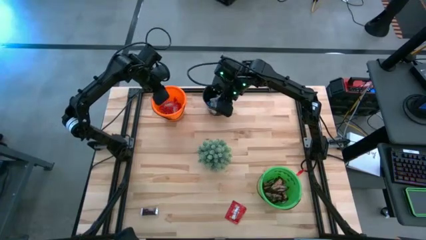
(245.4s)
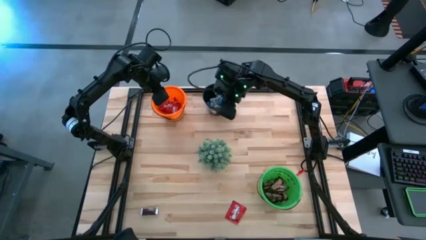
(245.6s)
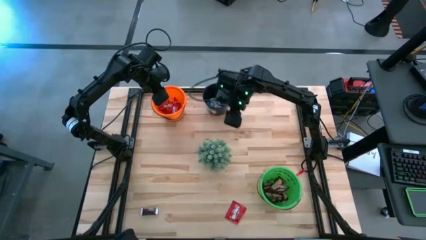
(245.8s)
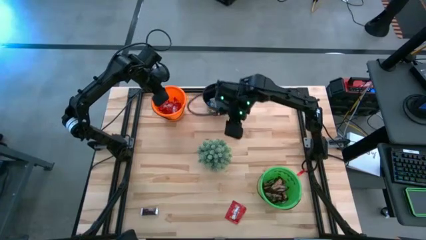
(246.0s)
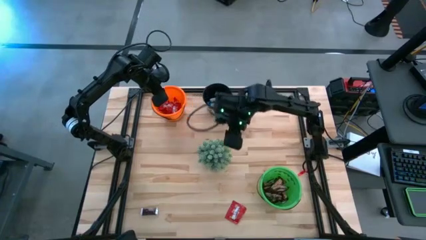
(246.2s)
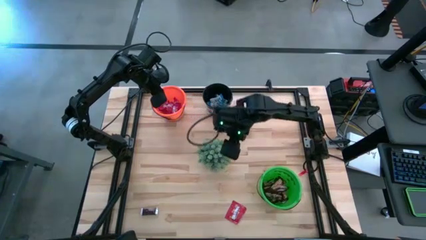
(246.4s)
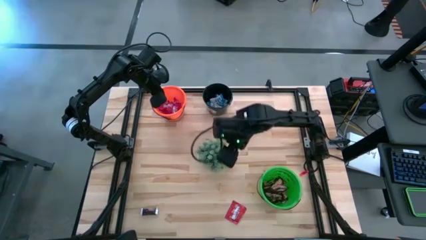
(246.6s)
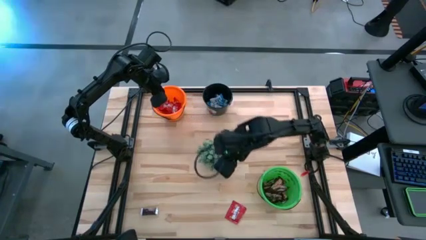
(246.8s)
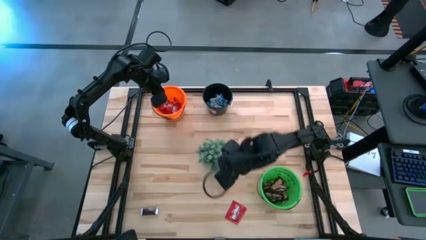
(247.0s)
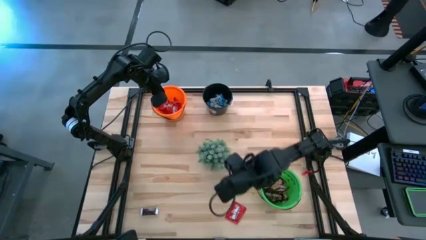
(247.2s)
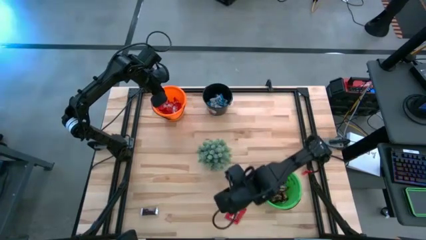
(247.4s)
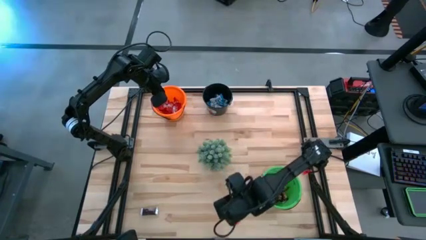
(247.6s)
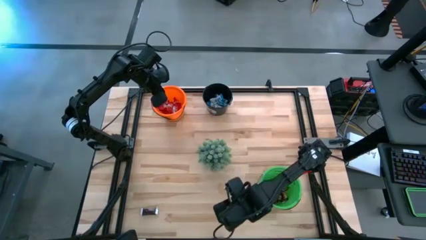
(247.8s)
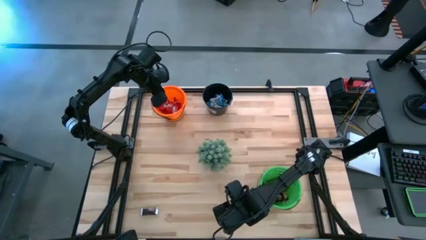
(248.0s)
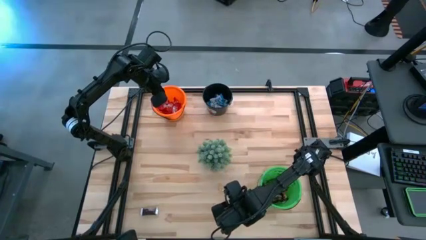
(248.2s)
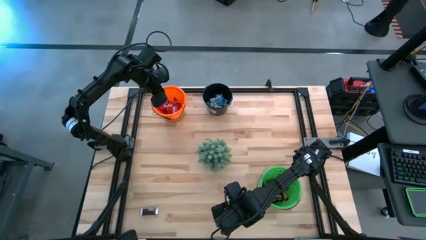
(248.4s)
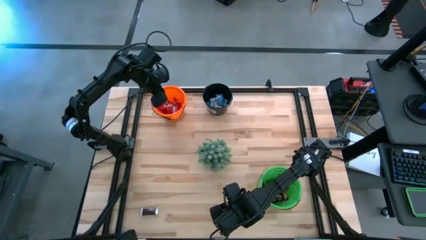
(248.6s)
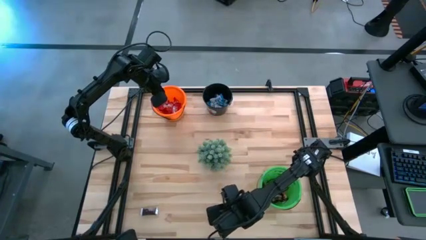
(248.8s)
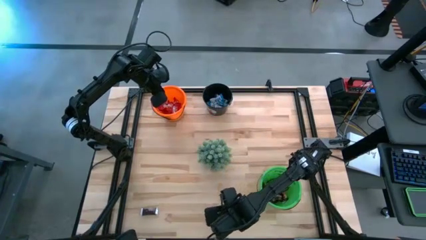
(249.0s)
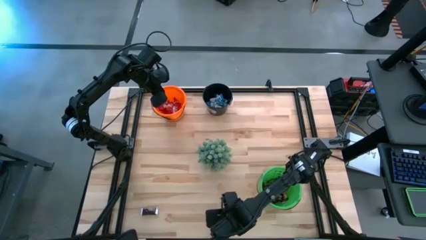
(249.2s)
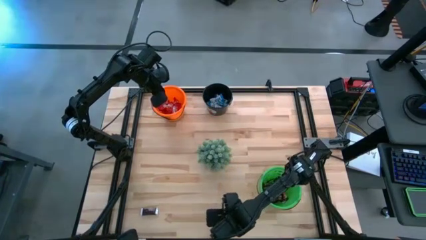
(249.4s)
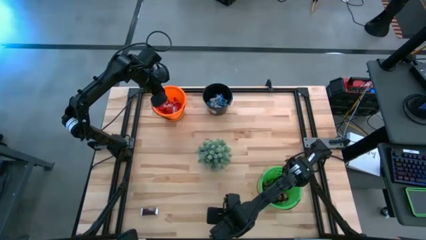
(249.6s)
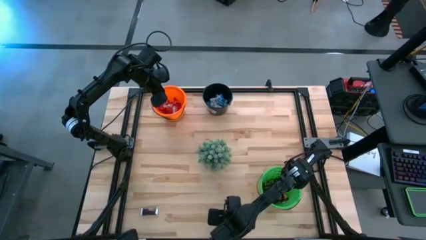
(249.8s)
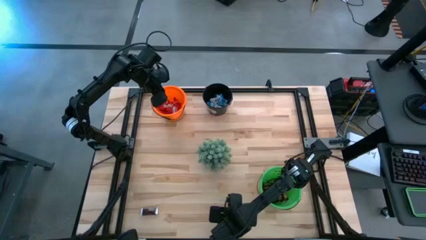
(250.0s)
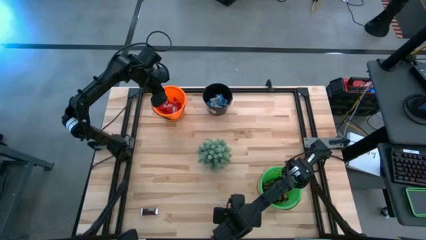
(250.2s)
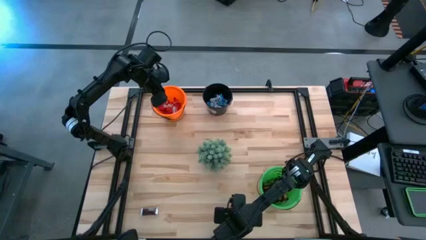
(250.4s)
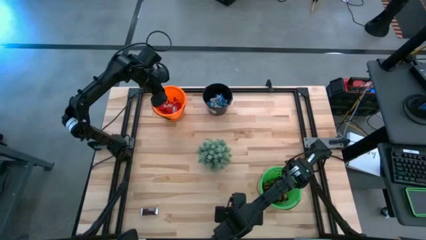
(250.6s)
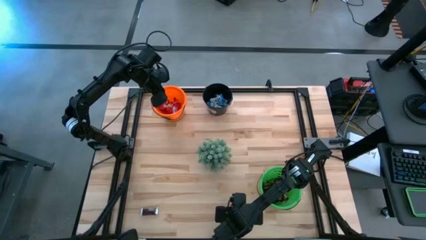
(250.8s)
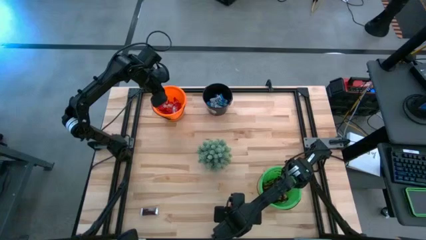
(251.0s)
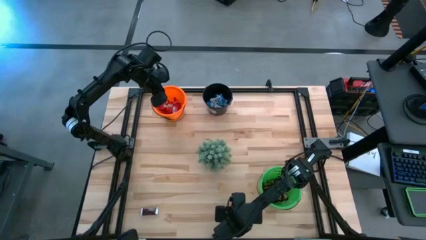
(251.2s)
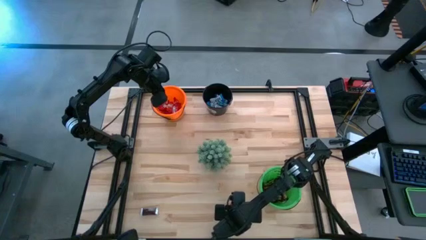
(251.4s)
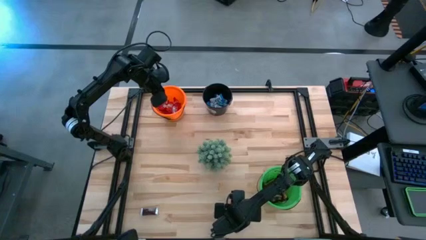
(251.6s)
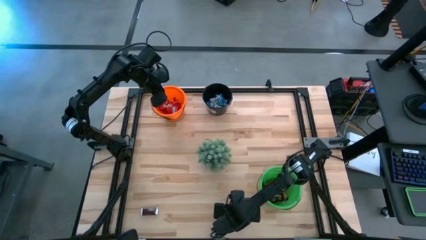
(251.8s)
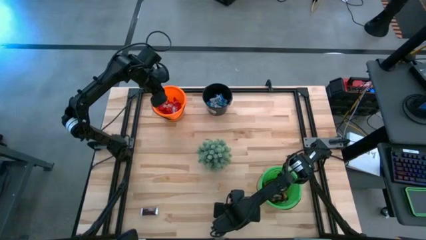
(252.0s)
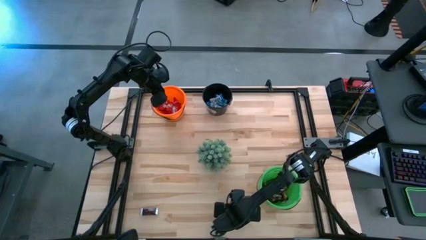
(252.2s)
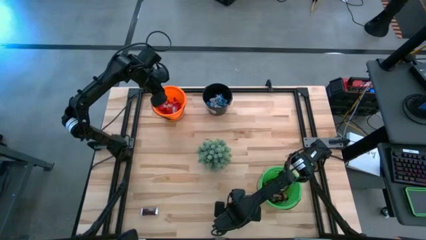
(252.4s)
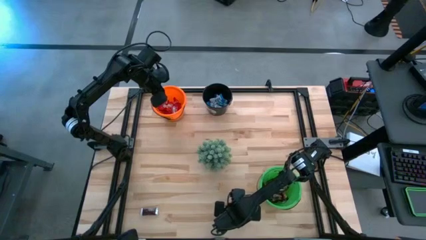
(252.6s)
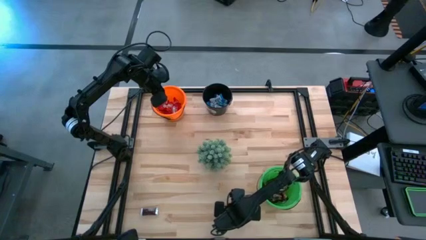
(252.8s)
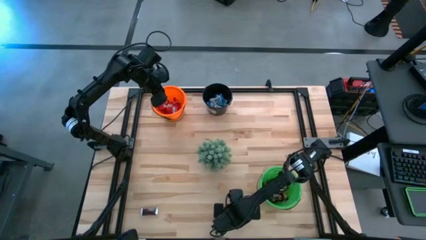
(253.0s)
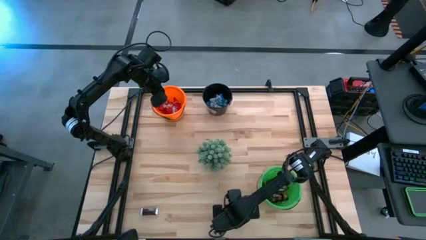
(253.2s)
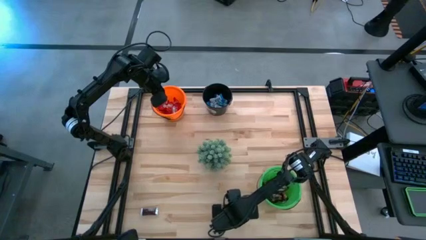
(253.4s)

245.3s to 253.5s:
Task: Organize candy in baskets
Put the red candy into the orange bucket

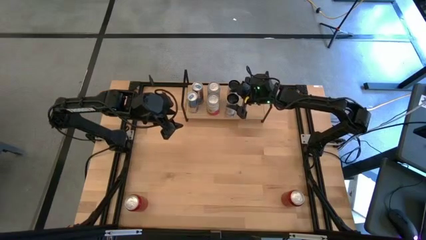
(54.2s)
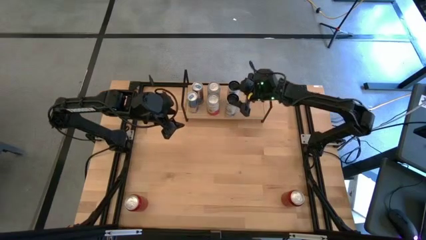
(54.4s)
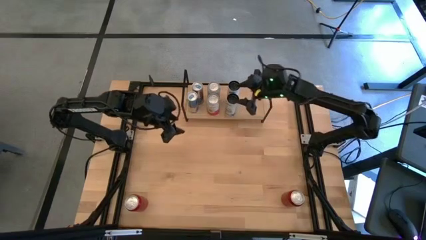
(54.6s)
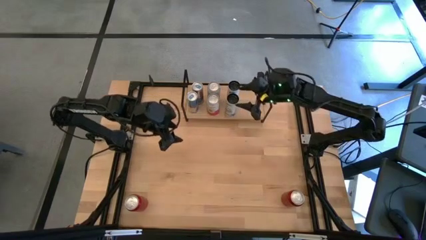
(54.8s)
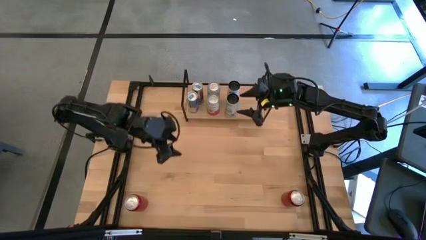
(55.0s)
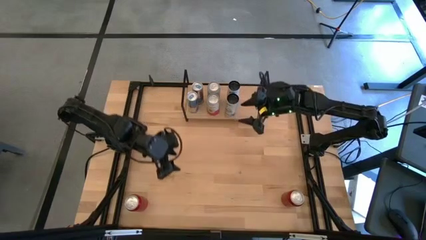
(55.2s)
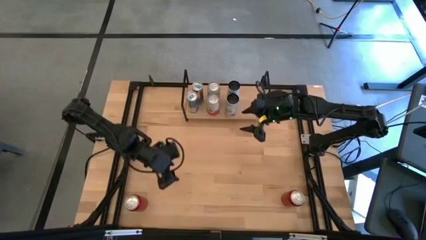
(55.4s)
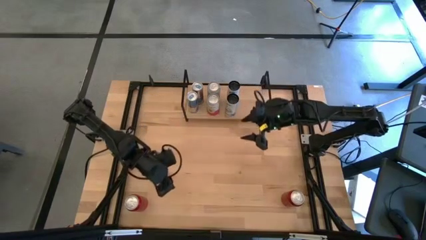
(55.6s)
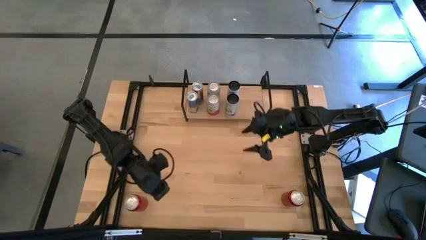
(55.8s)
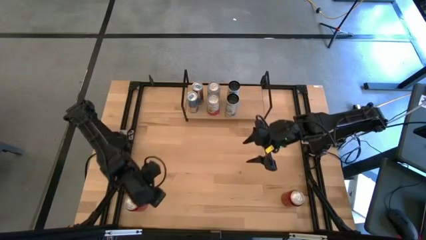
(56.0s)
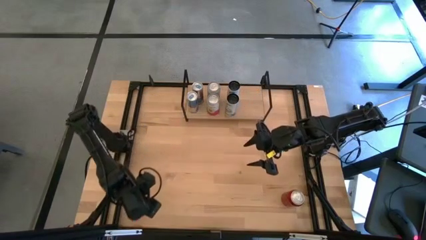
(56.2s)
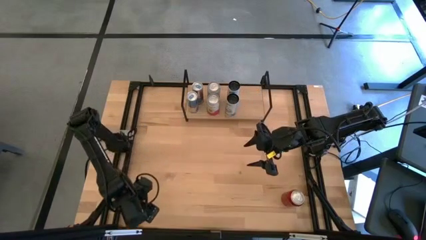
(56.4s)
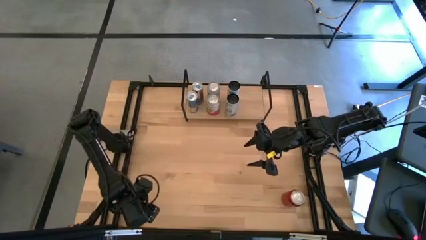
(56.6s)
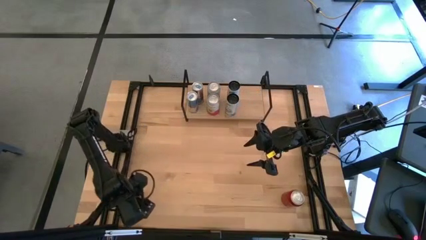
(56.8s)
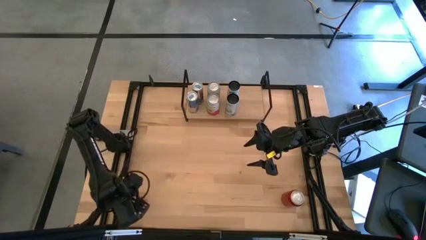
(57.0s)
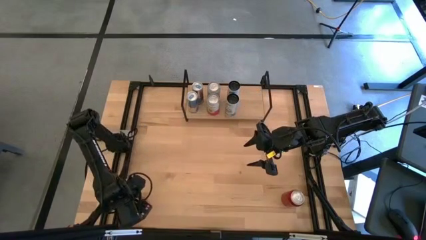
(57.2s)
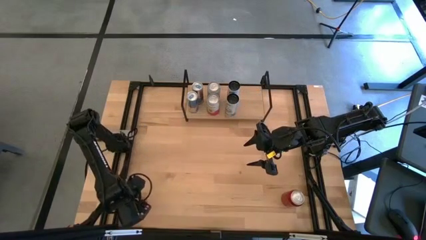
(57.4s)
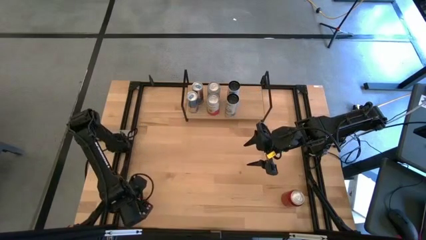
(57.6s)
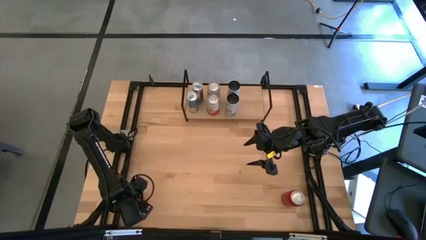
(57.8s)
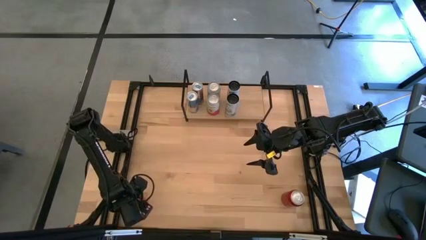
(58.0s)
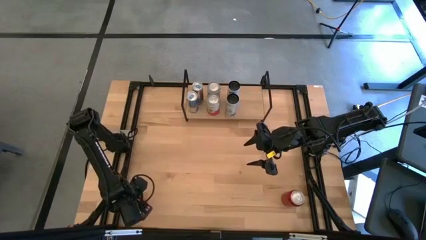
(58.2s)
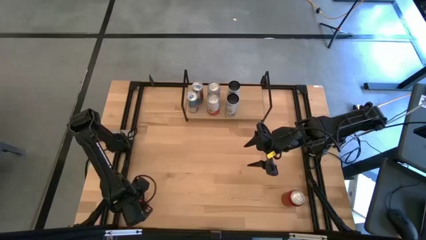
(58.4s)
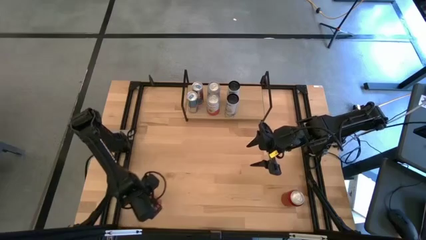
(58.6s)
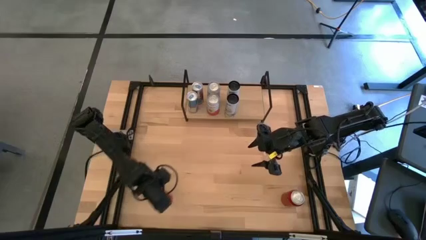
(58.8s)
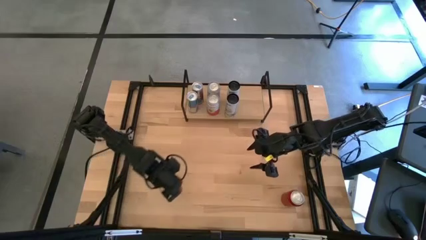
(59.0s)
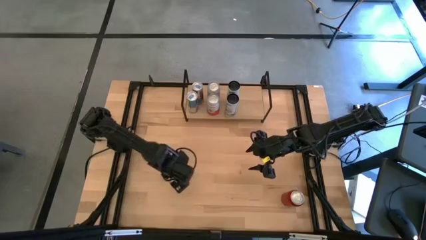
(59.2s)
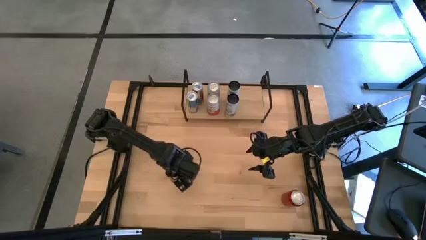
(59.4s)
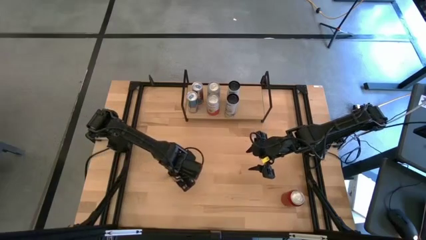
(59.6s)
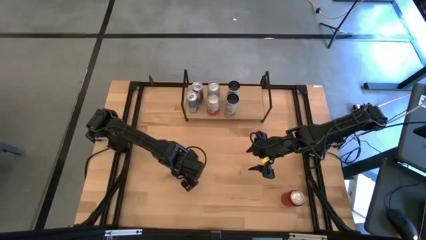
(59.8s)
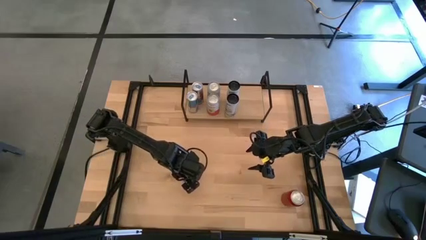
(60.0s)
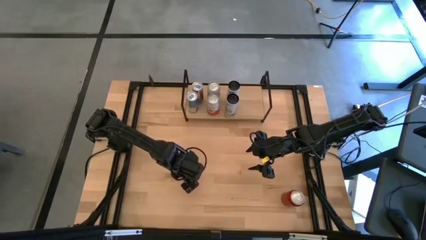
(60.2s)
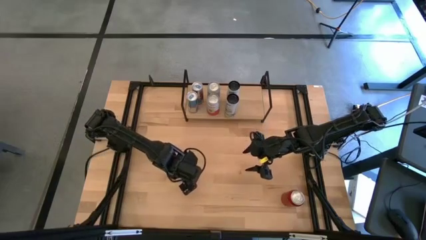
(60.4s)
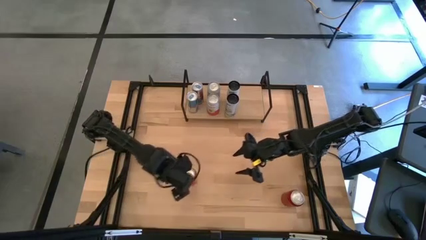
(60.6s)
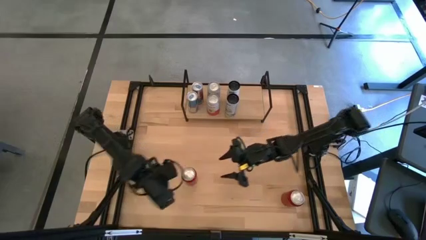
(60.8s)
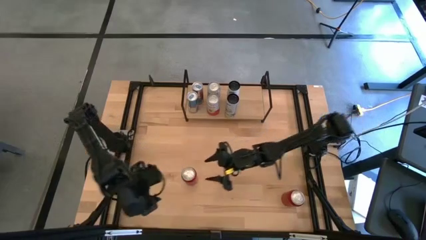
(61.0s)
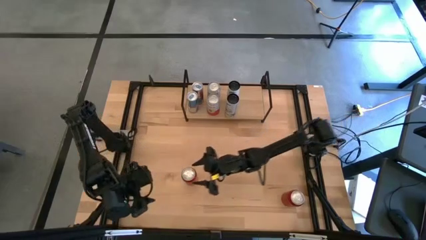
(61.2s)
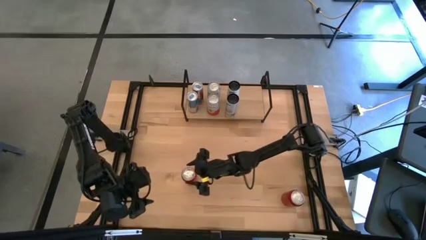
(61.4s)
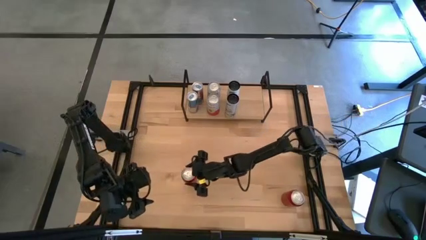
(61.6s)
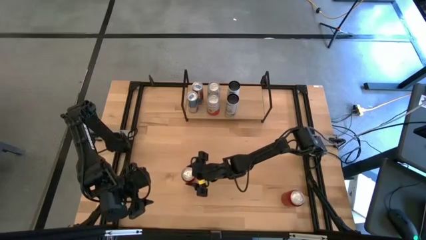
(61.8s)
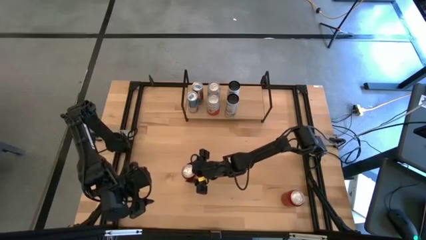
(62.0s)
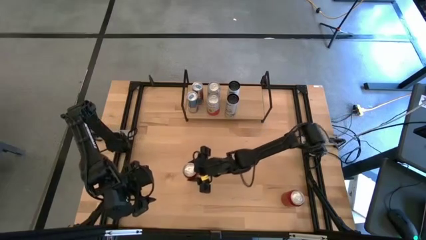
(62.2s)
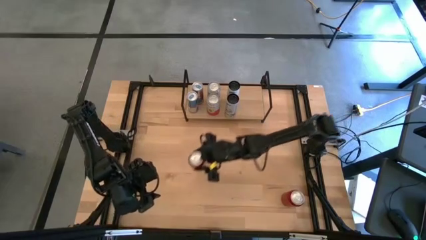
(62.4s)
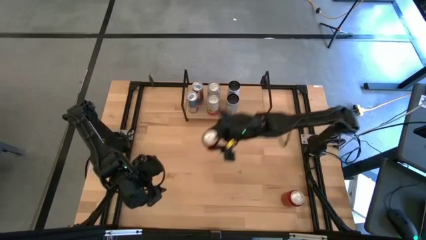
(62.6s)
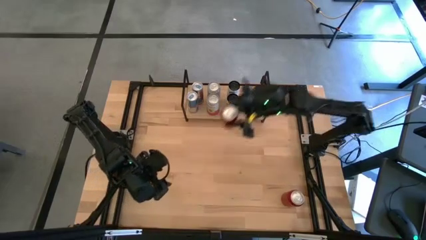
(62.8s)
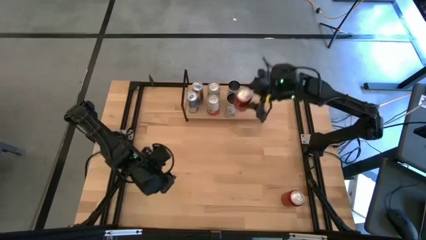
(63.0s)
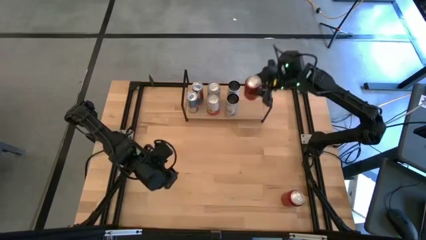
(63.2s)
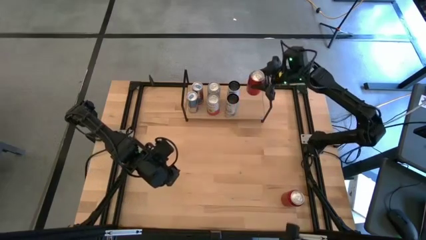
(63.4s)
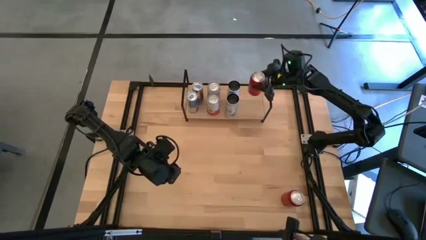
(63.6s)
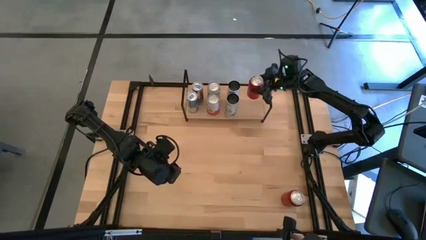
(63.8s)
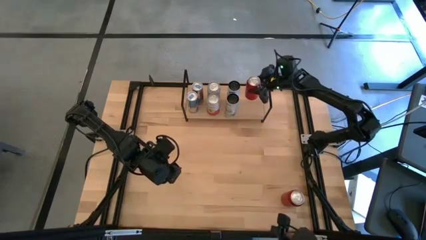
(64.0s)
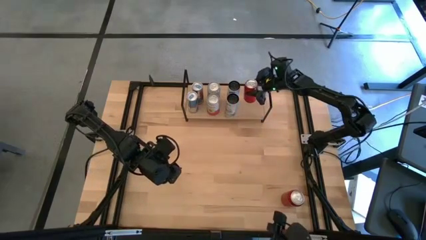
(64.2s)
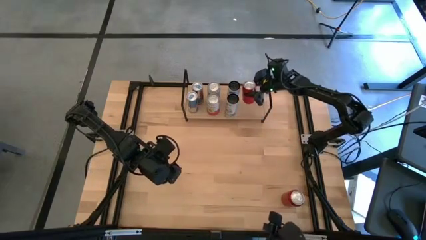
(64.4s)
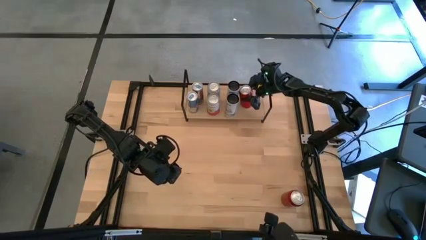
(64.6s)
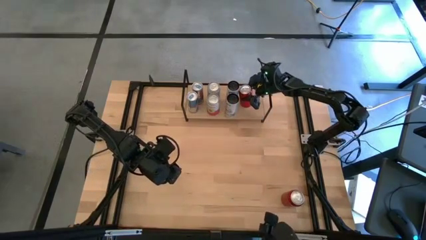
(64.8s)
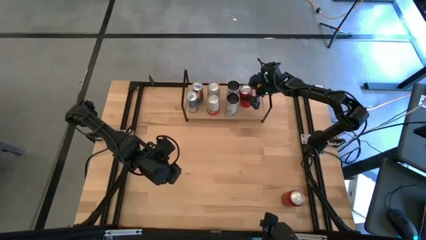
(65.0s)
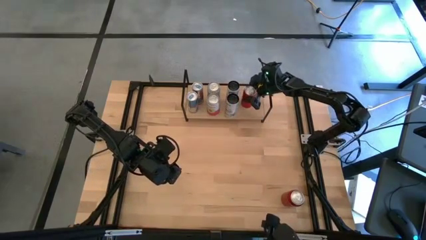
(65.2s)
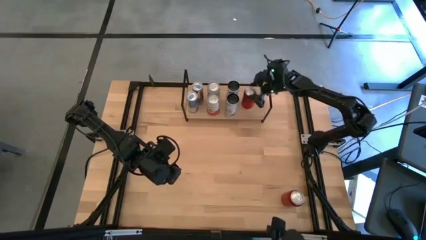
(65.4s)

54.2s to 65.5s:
Task: Place canned beverage on shelf
Put the left red soda can on the shelf
